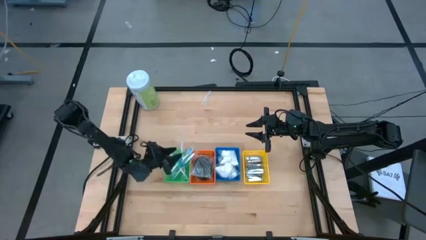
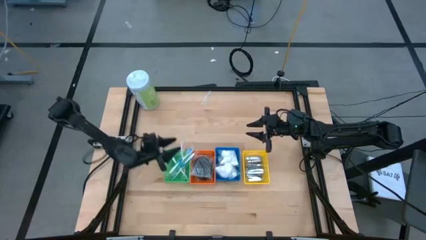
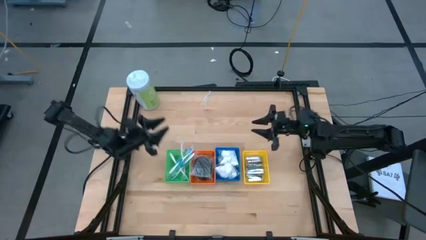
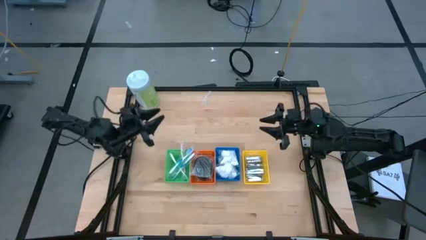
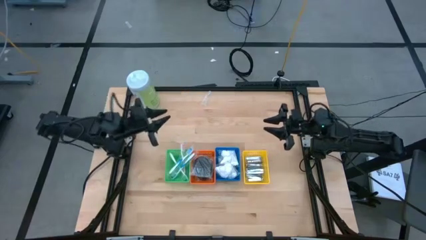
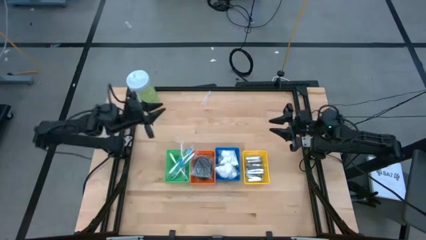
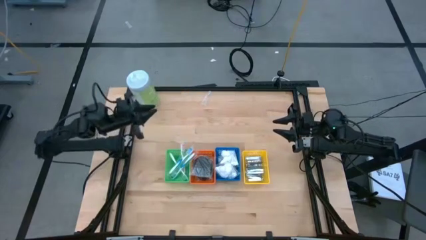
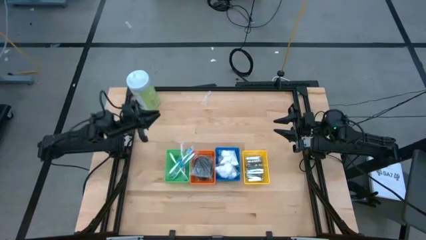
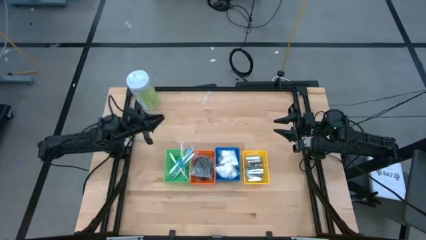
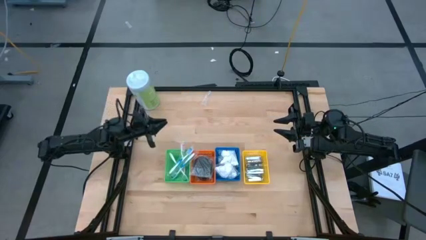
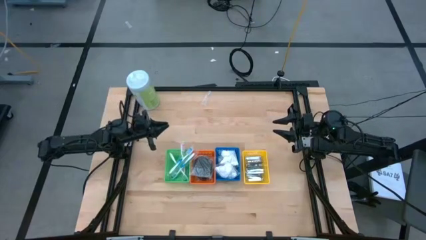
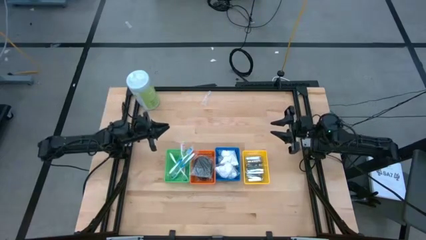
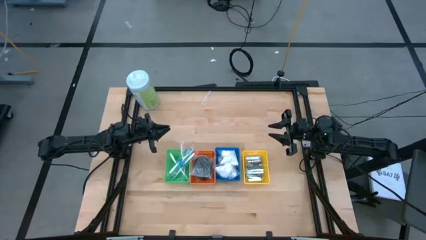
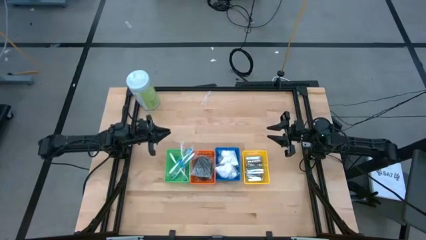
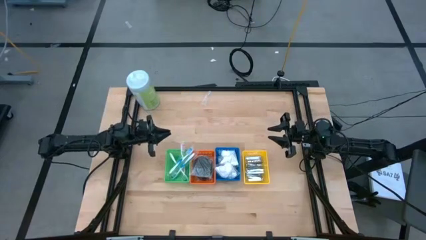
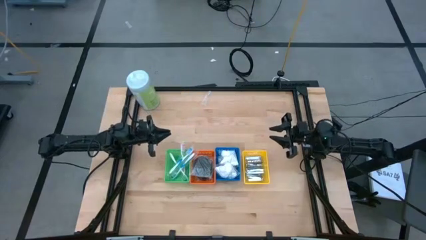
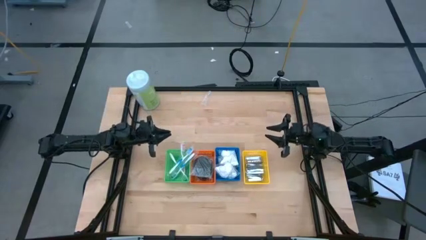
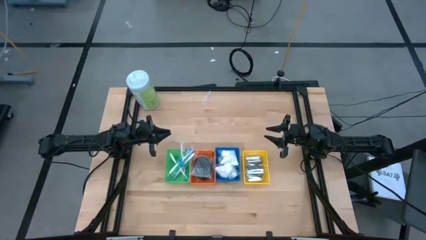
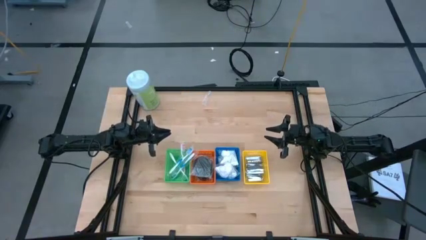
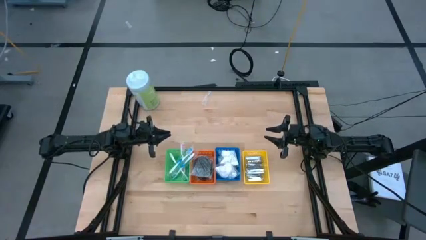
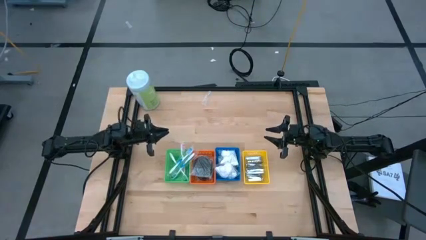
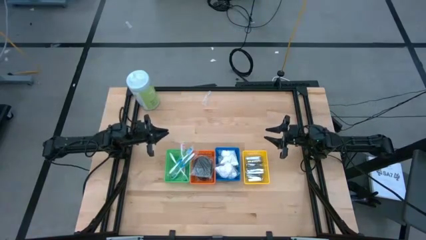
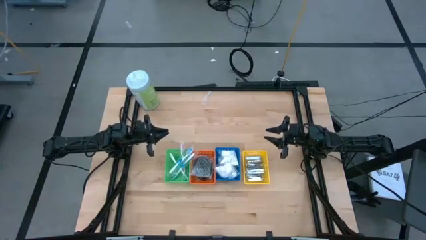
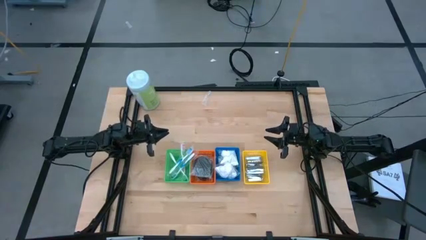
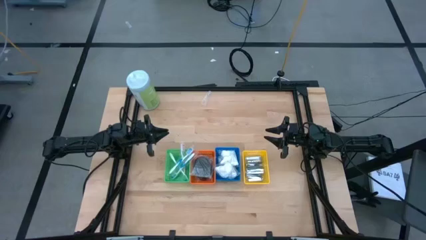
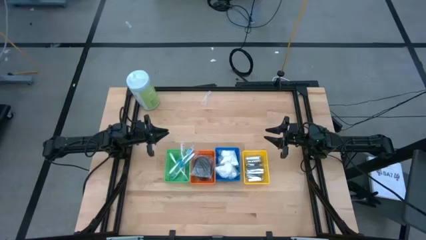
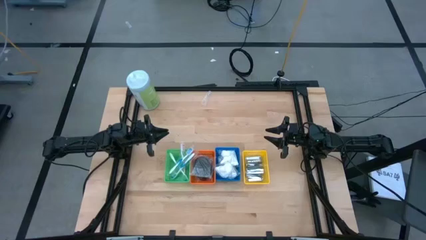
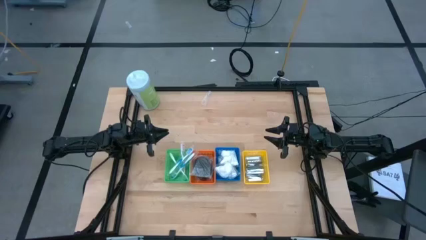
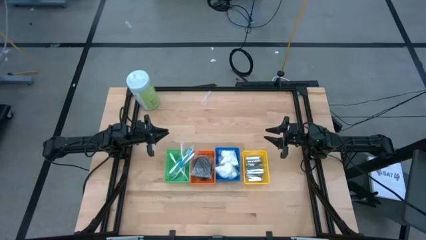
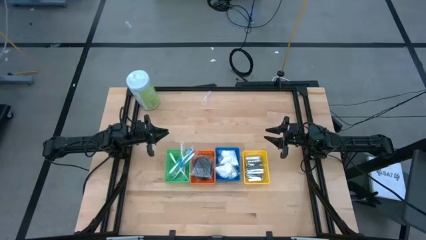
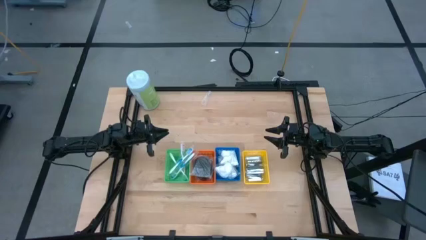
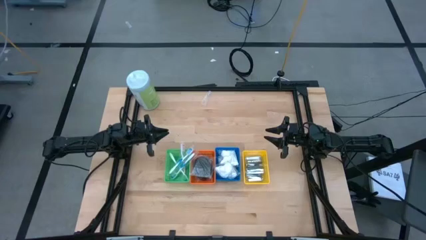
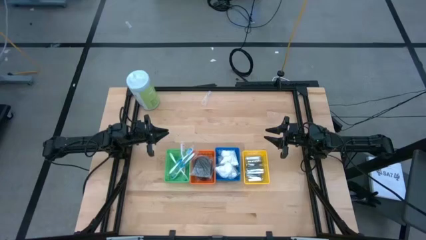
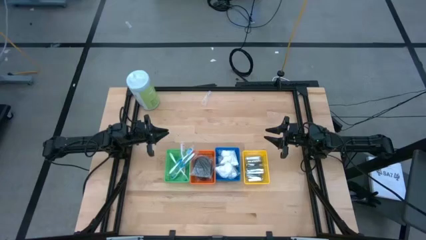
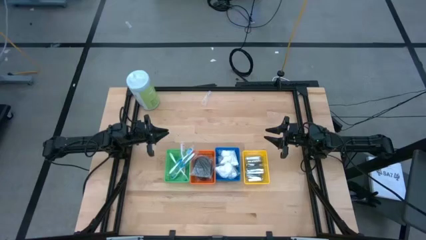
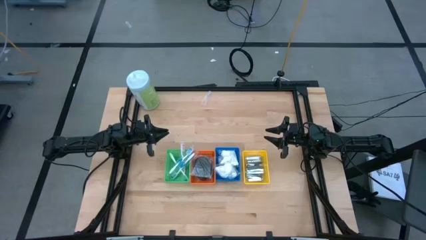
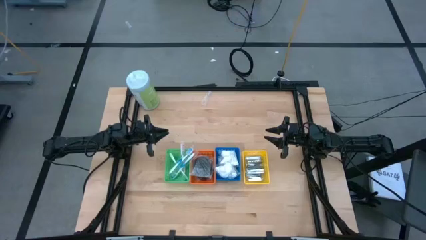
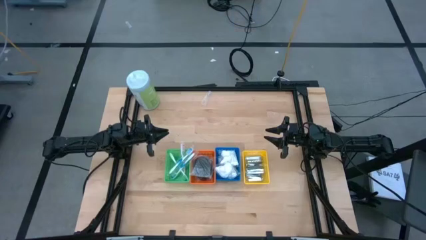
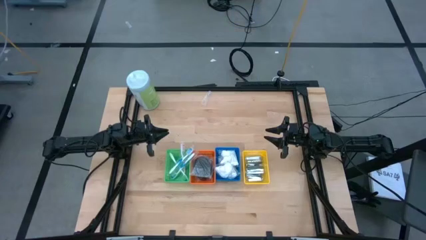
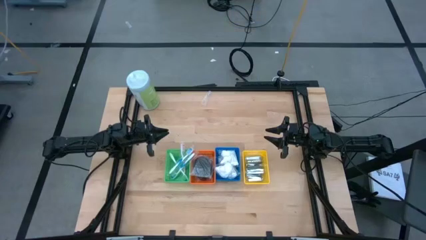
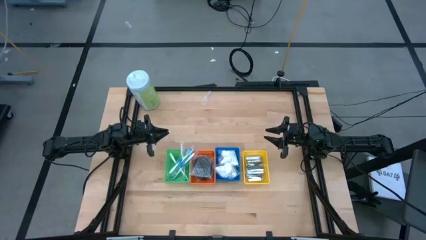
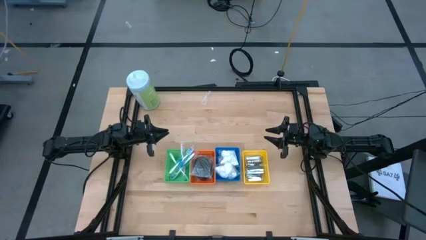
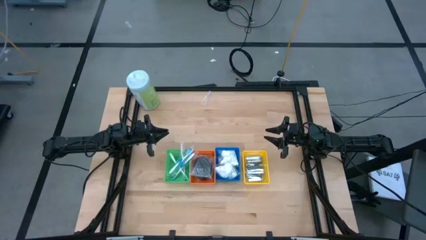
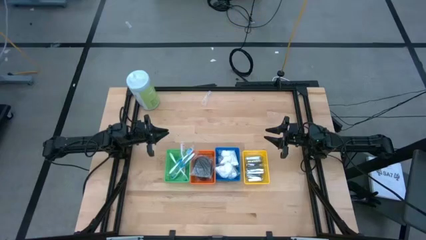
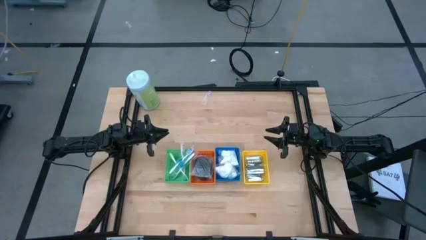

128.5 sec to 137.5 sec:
Task: Pick & Place Travel size toiletries
Return to Home Position

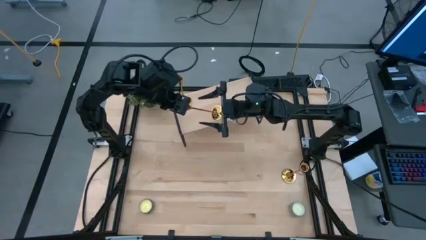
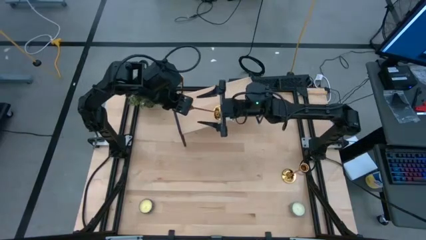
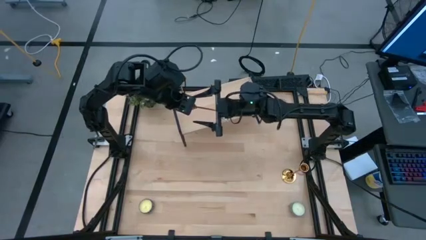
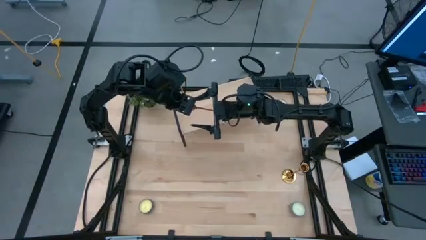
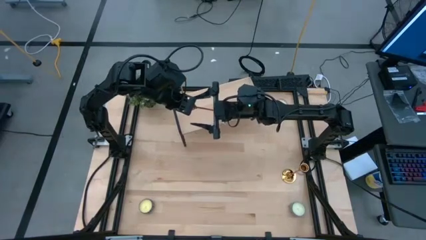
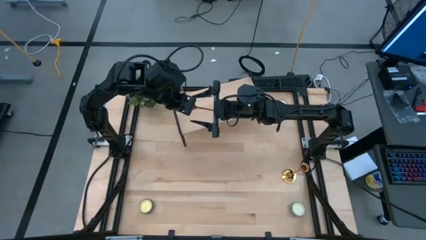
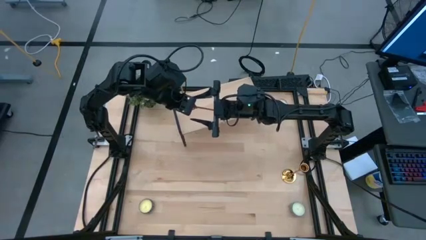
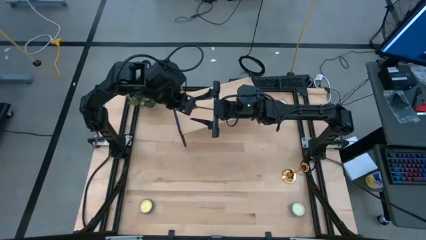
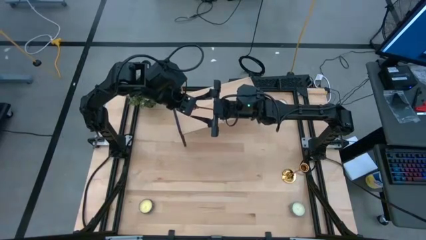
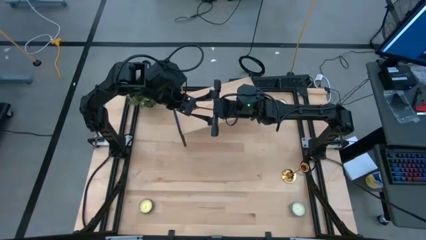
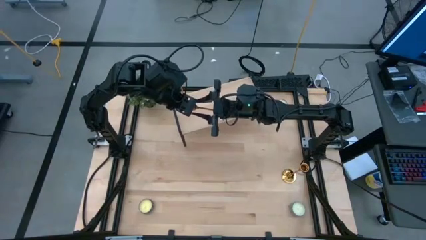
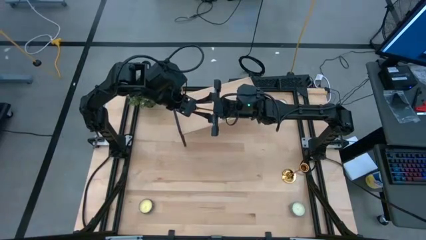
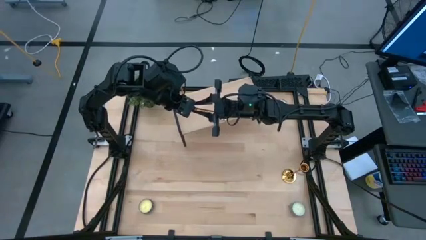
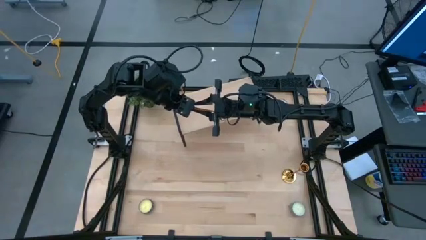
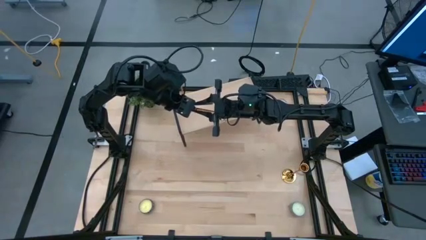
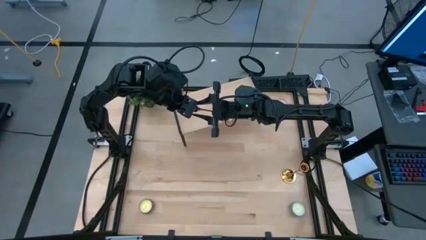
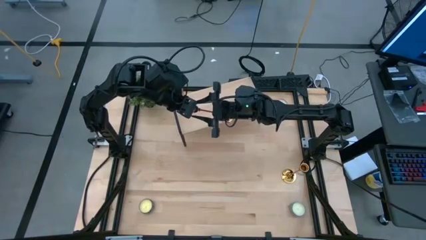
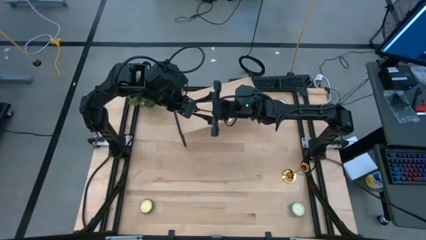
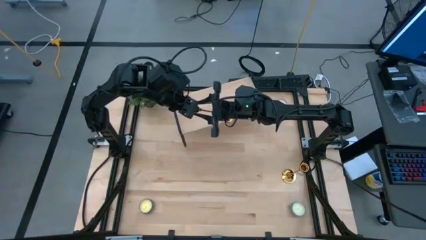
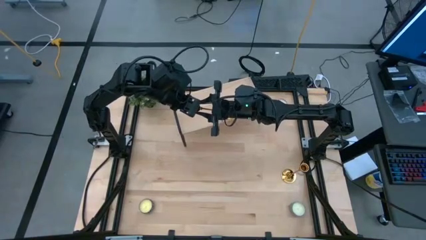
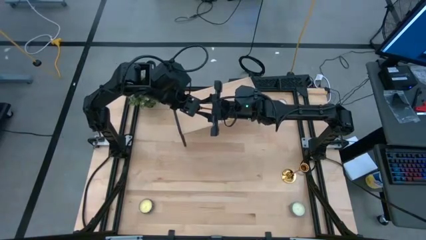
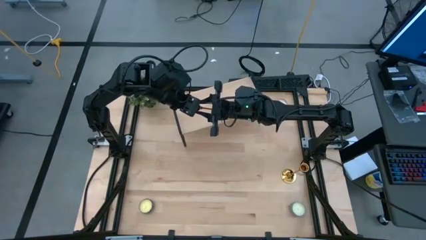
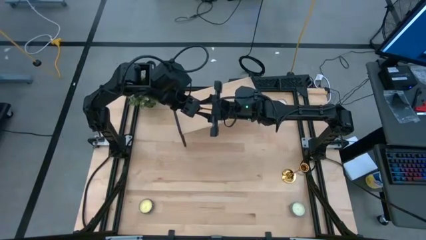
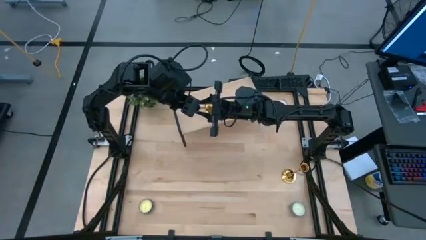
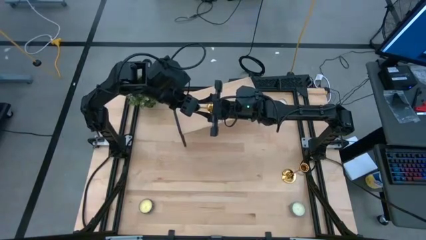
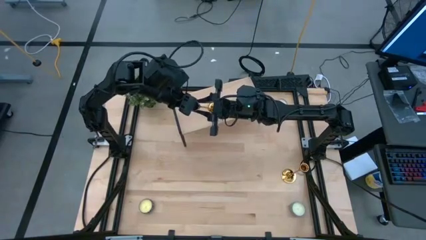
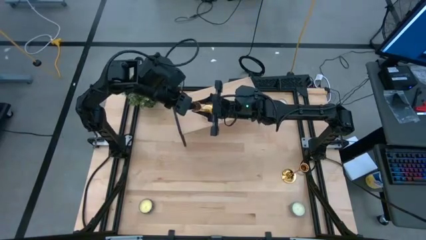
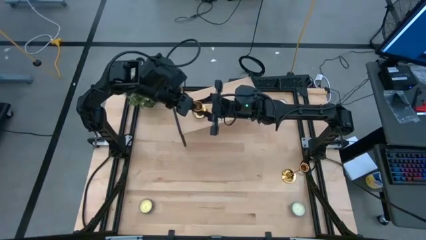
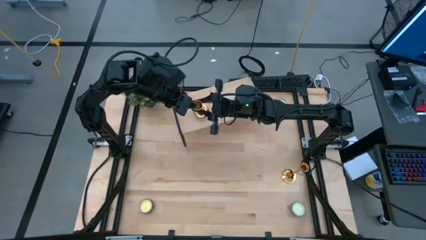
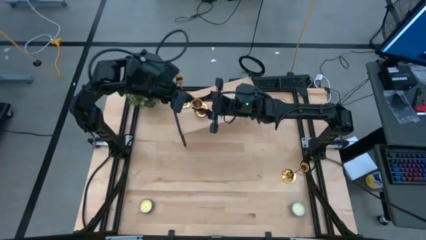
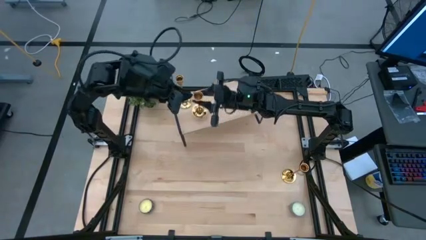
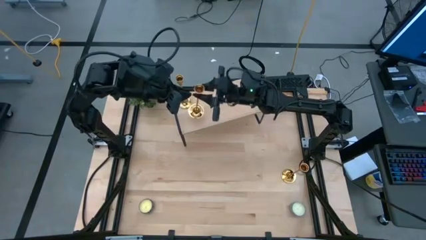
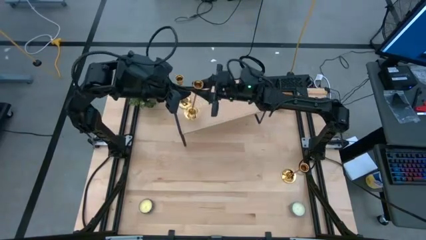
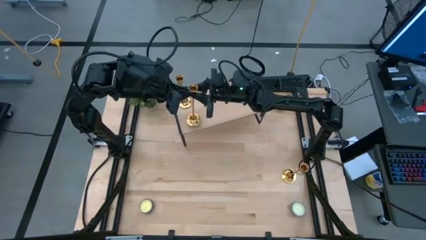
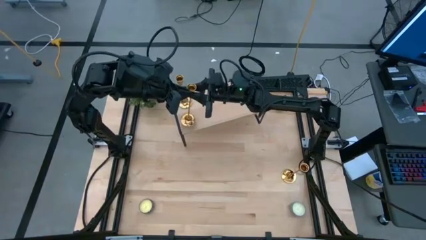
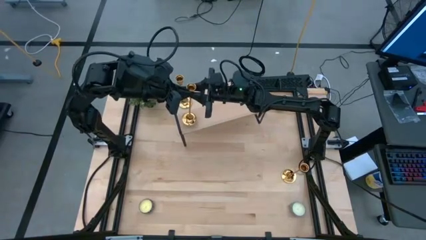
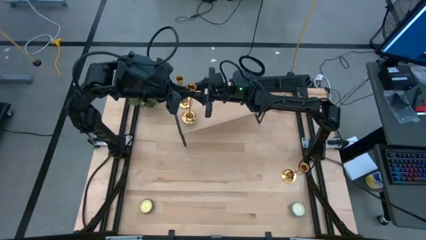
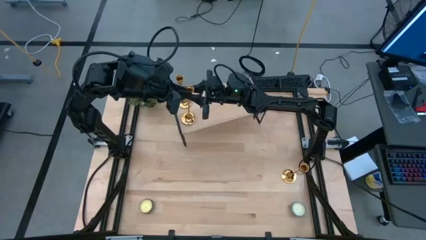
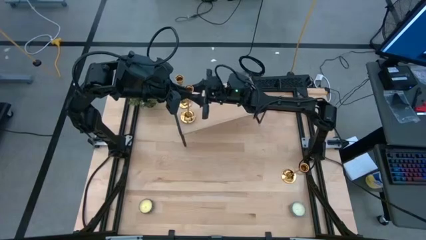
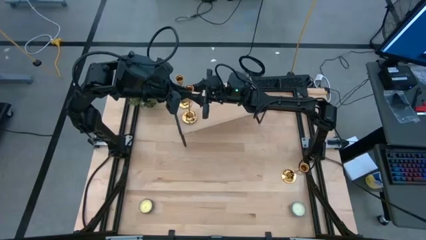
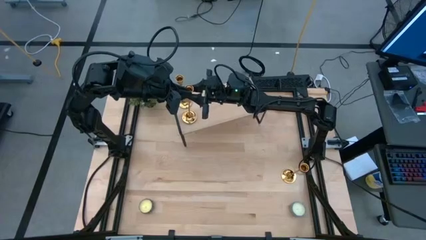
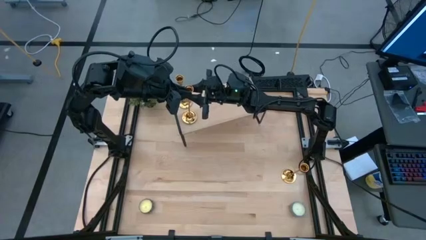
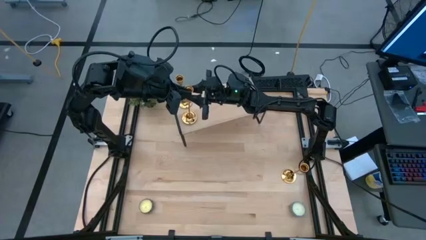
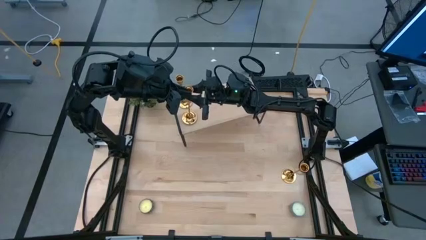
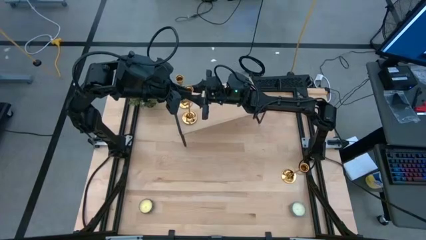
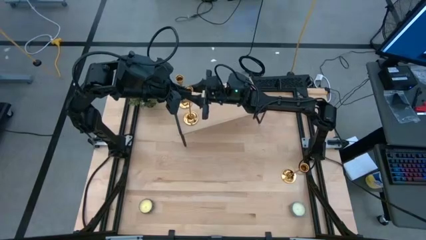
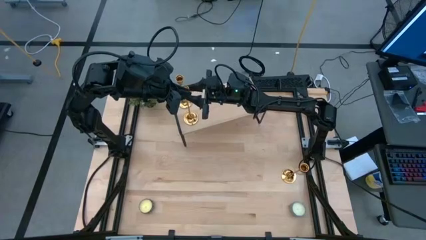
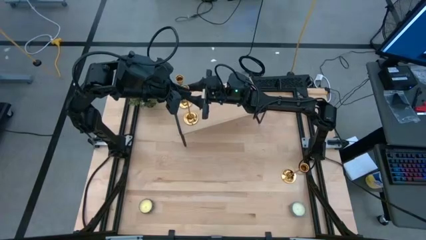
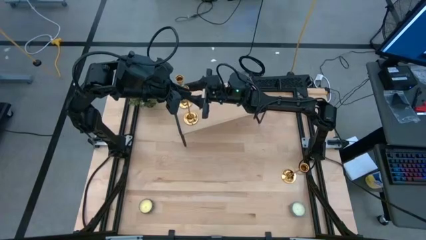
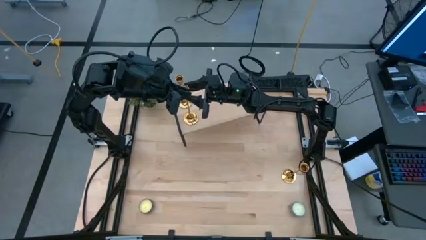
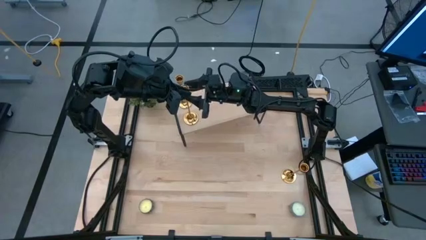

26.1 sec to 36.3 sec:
Task: Pick & Place candle stick holders
Put the left gold candle holder on the shelf aligned with gold candle holder
